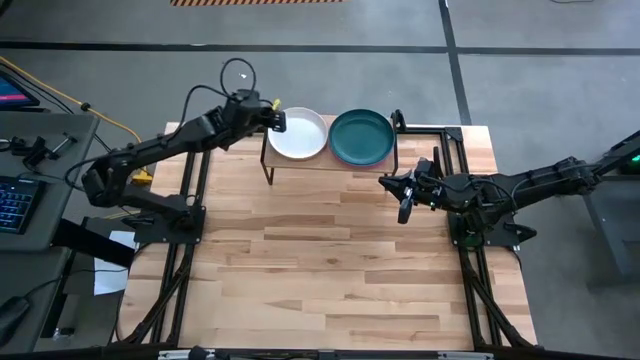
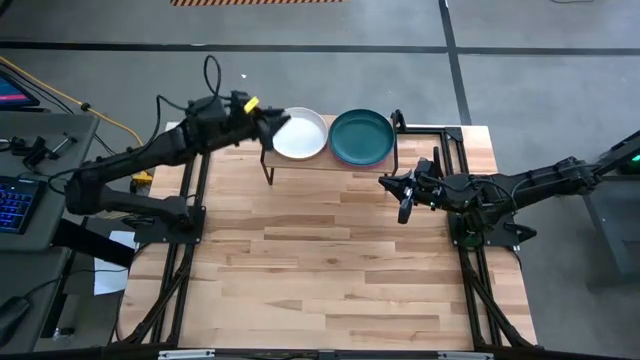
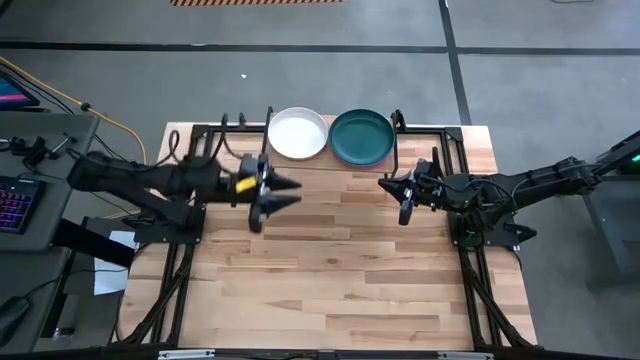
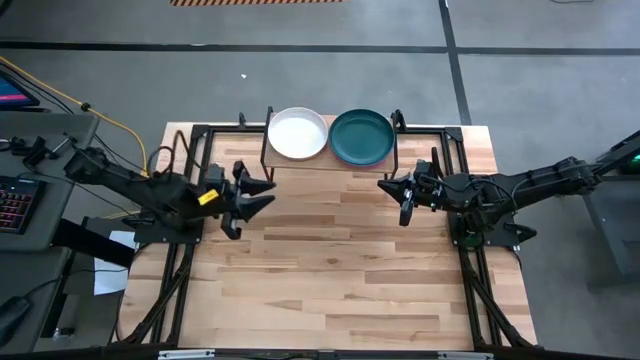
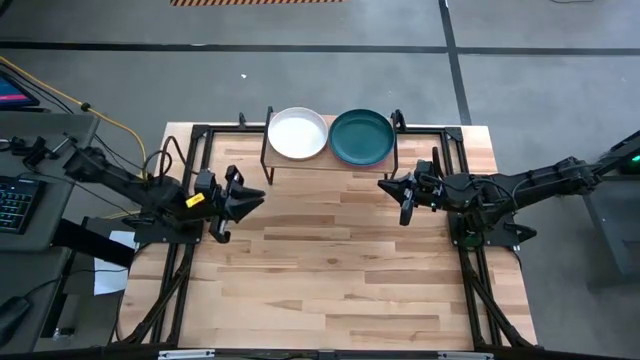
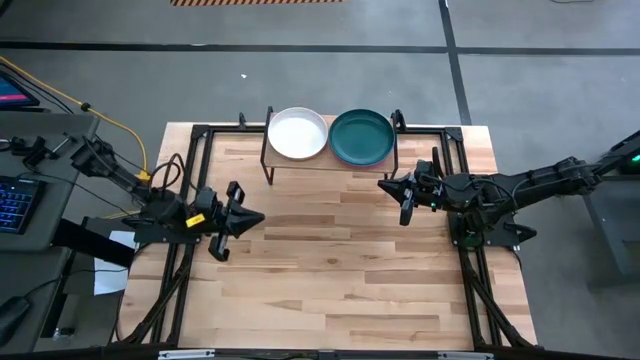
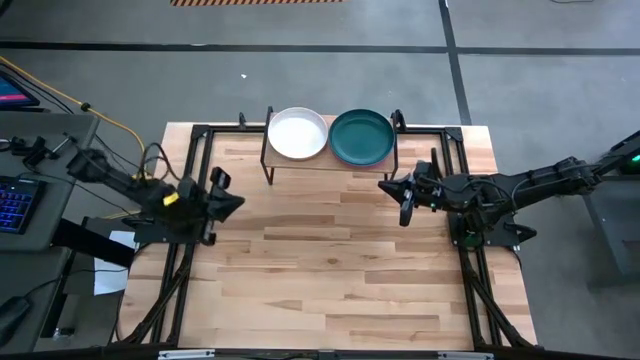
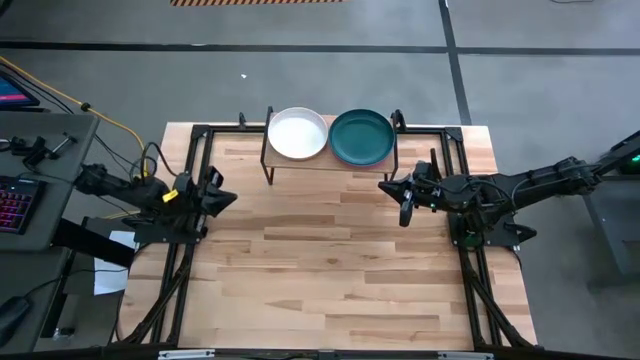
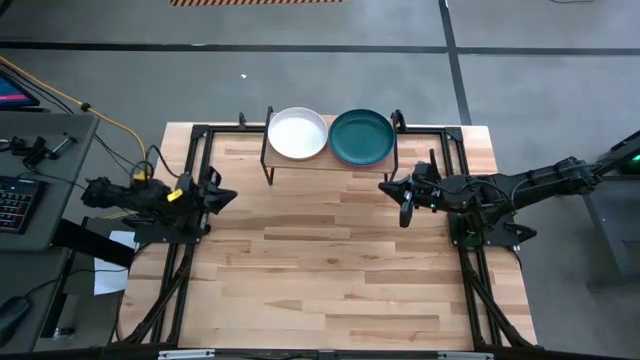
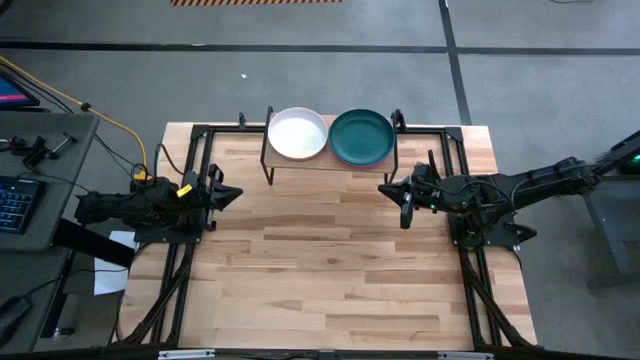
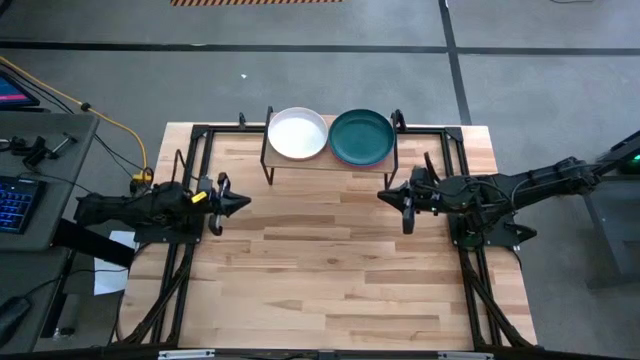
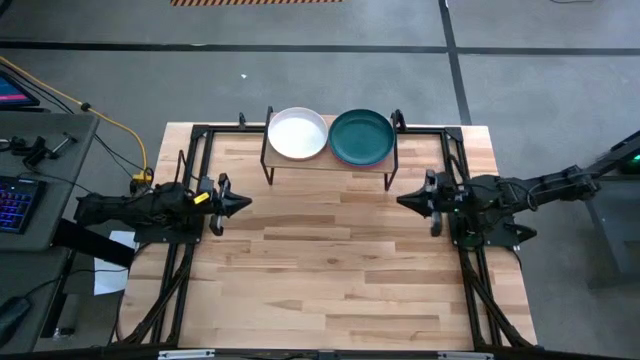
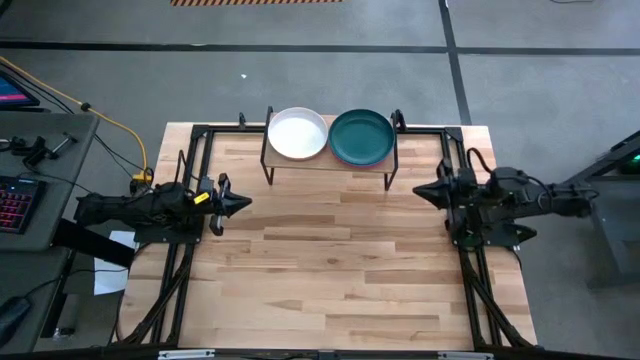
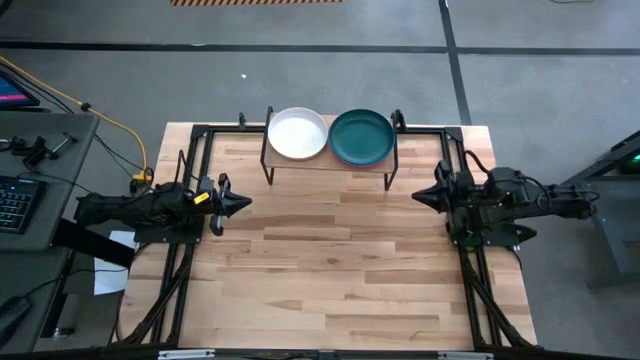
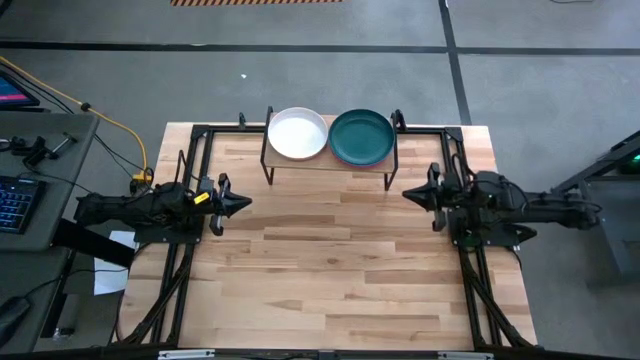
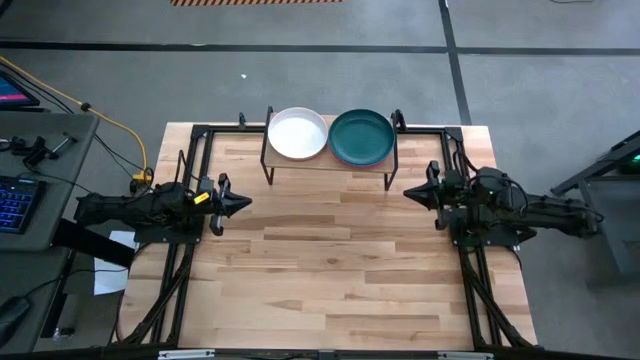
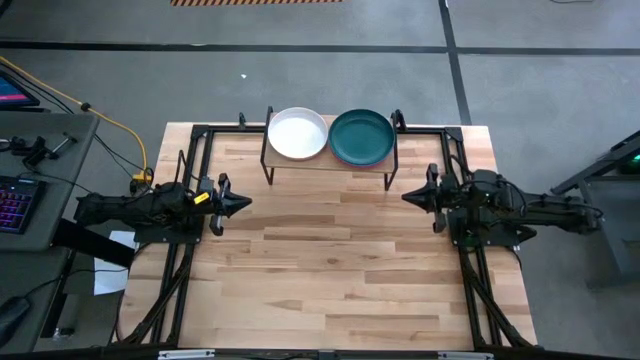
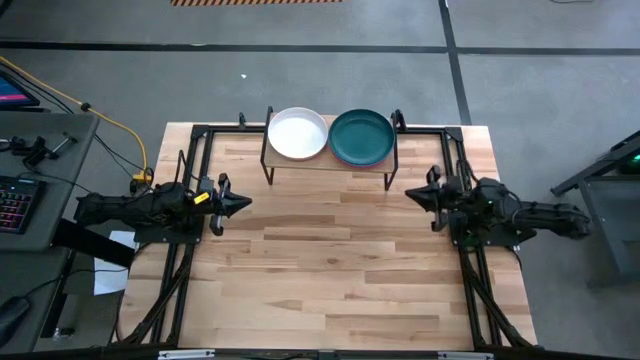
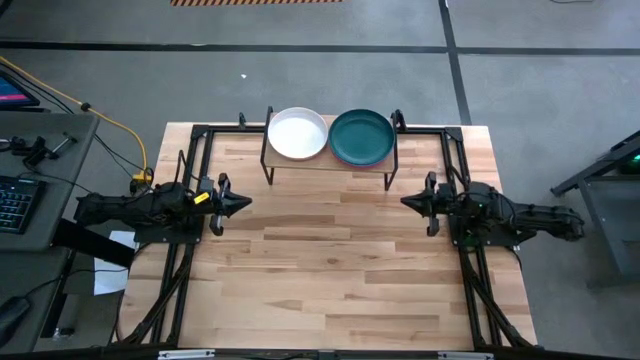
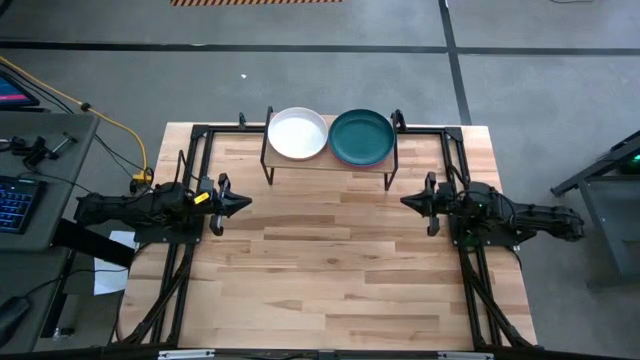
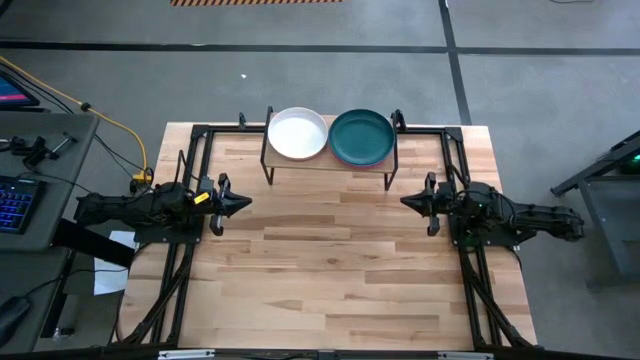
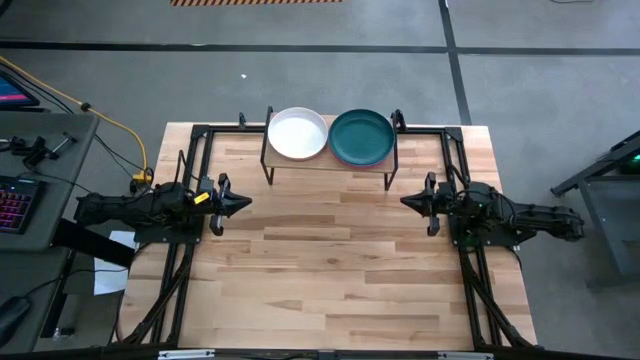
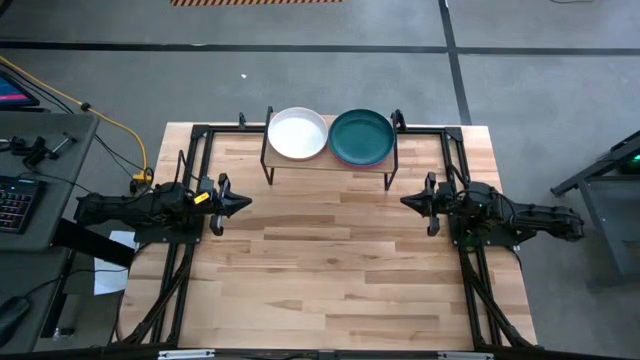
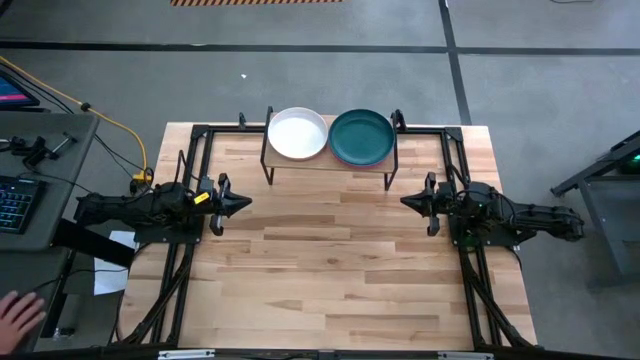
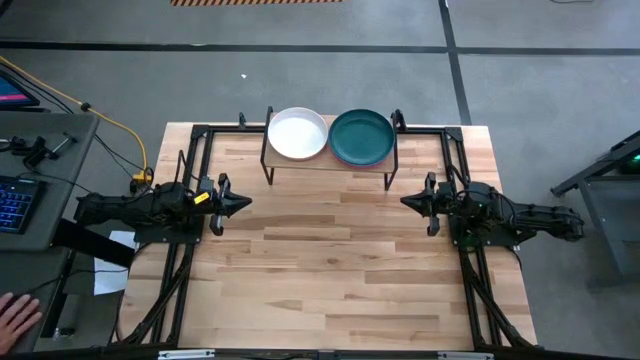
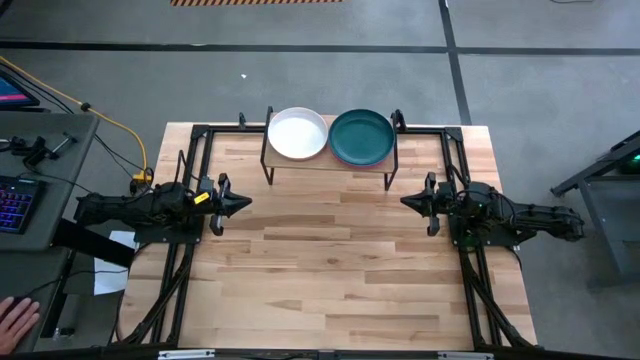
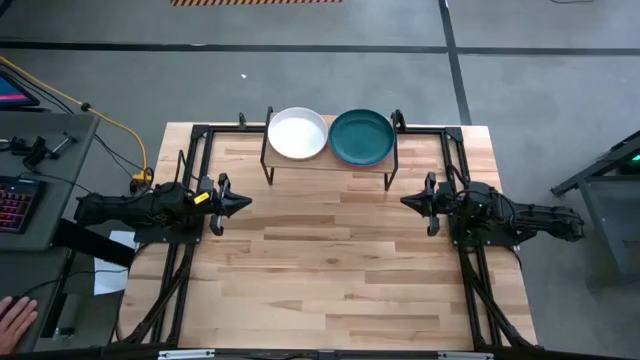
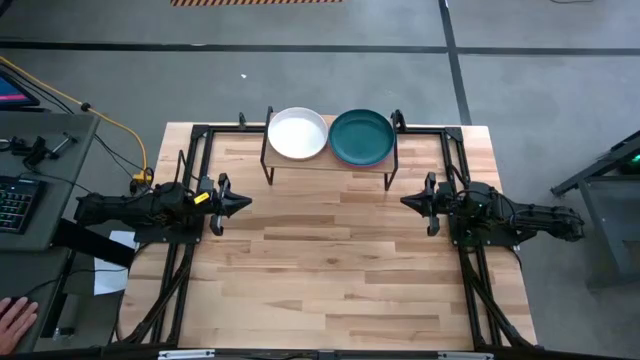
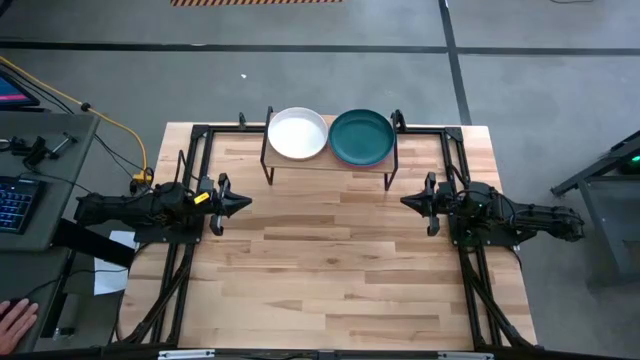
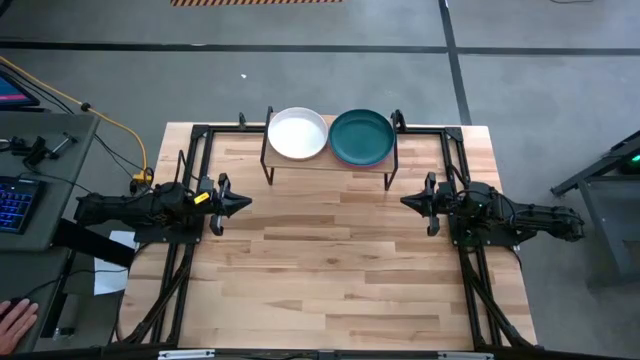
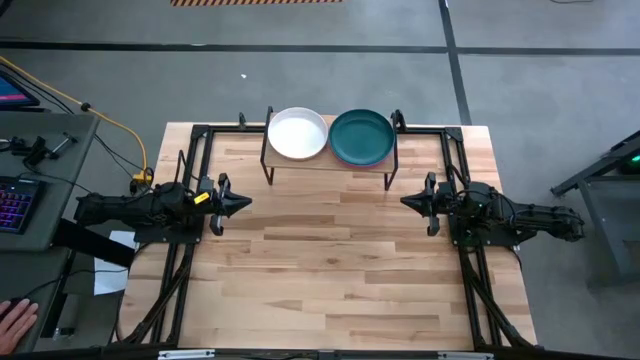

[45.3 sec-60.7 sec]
Task: Place and stack plates onto a shelf
Return to Home Position

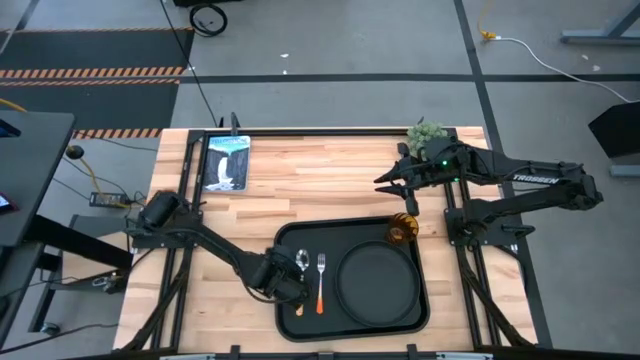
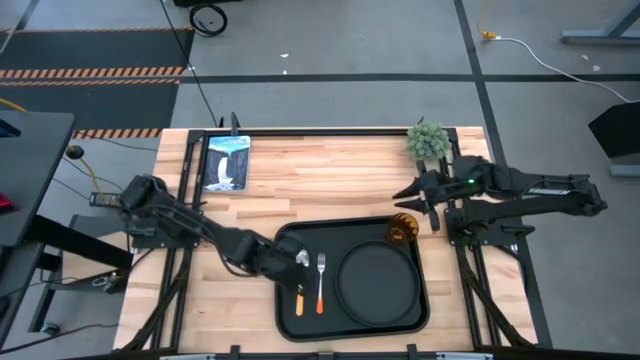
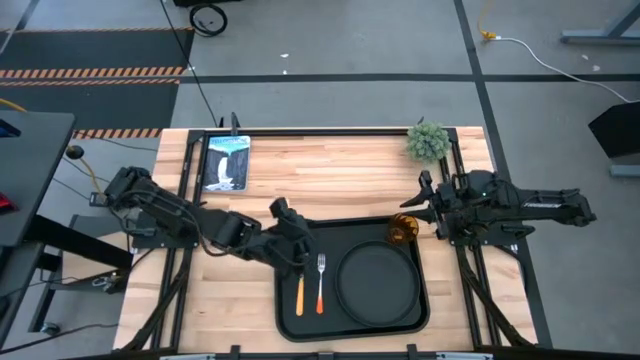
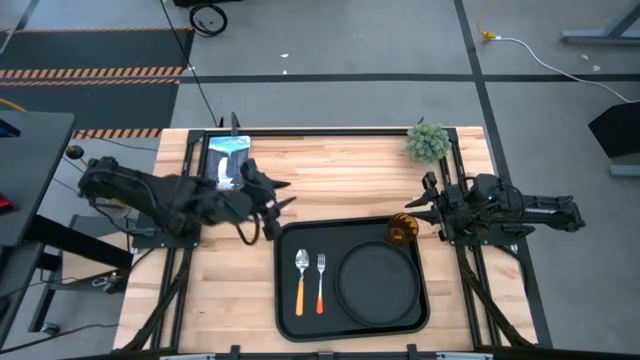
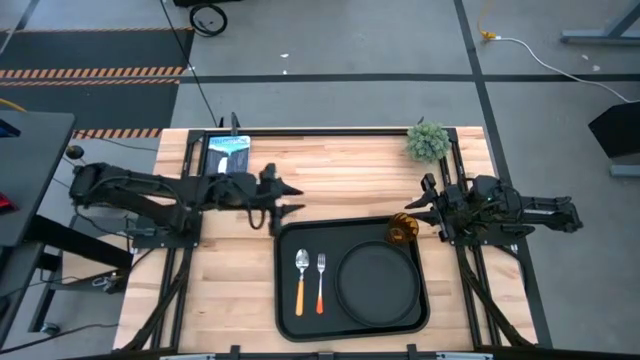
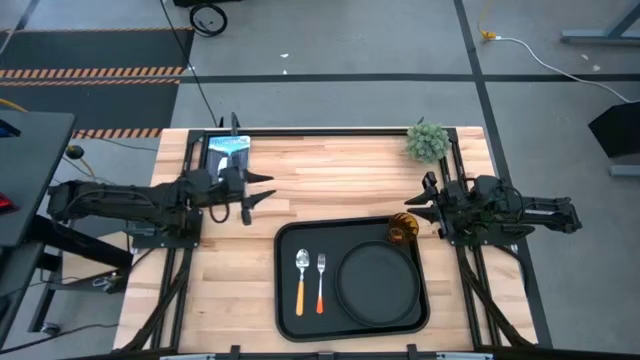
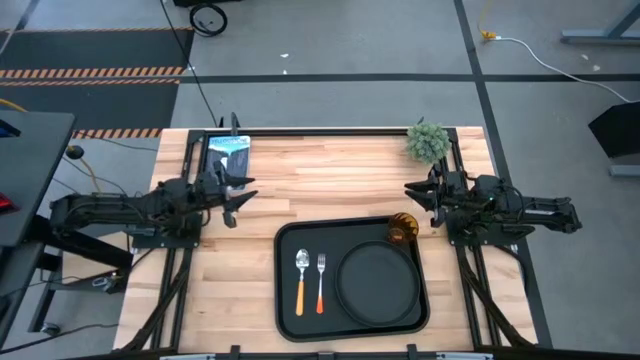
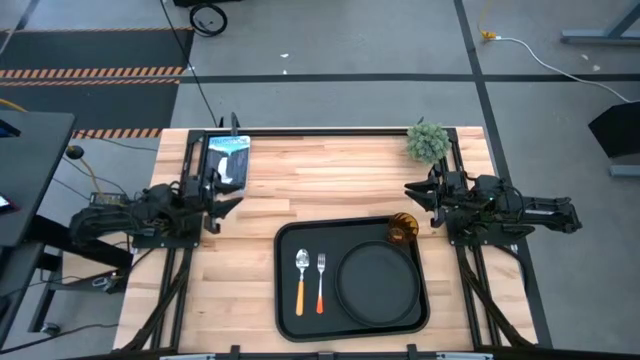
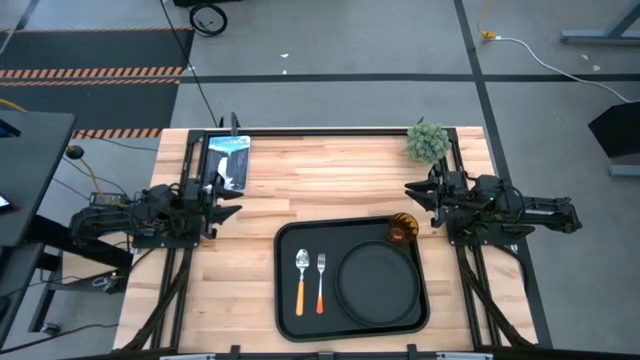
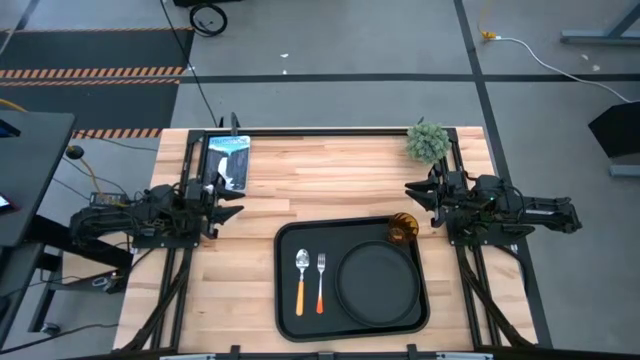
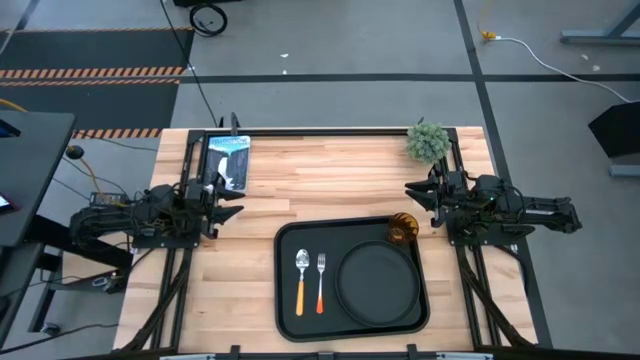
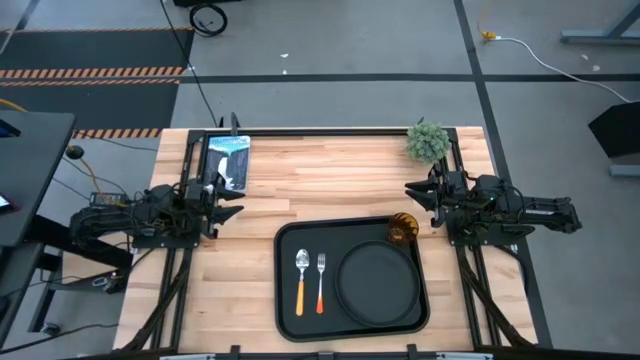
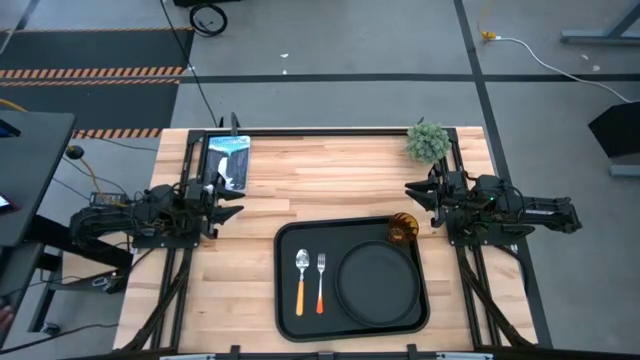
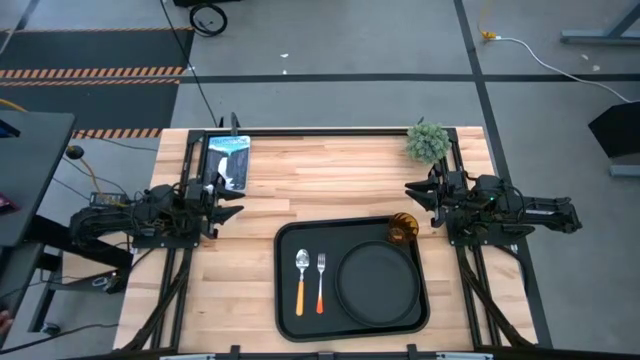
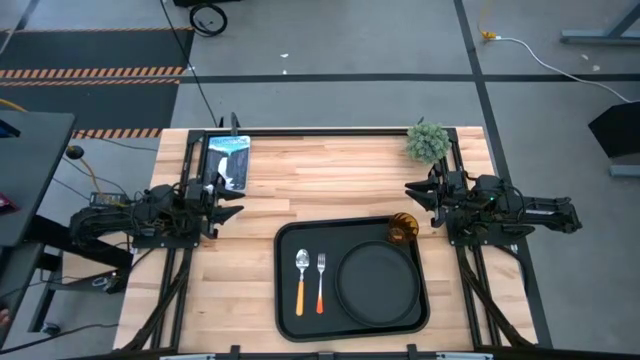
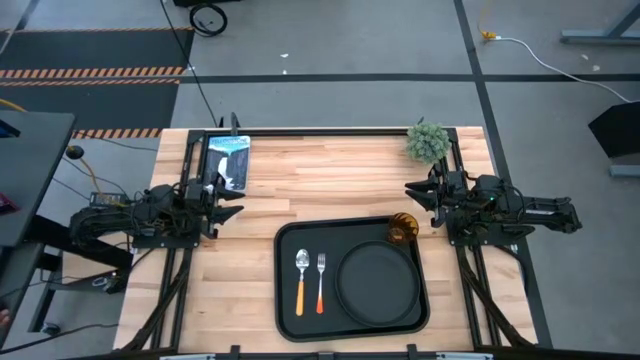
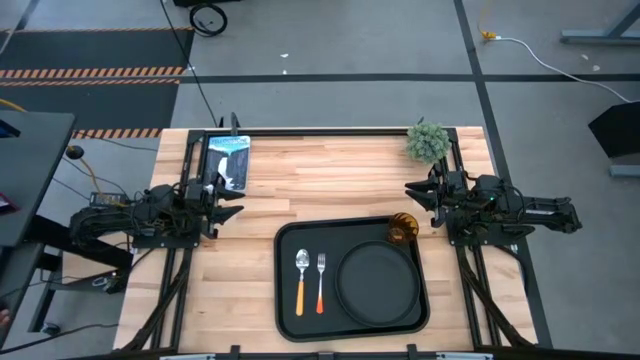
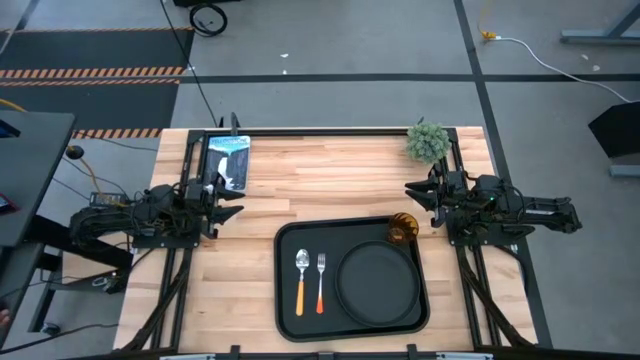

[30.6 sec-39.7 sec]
Task: Pick and place plate/cup/fork/spoon on tray
Return to Home Position
